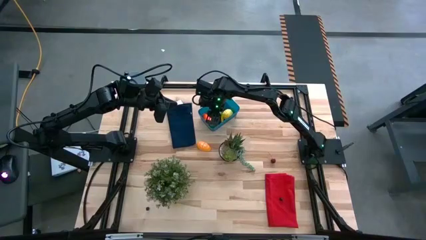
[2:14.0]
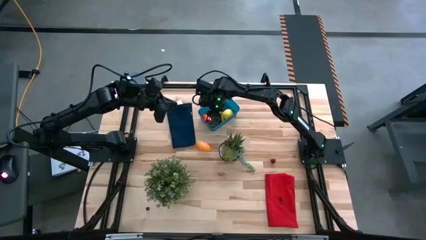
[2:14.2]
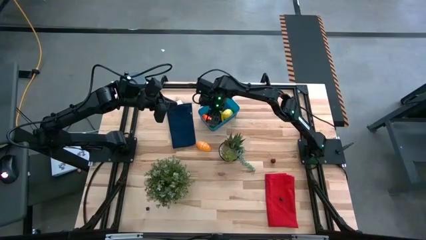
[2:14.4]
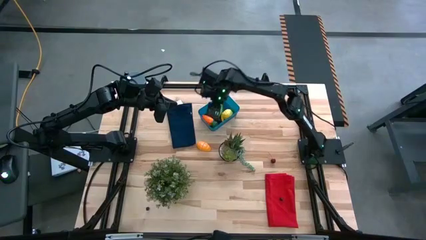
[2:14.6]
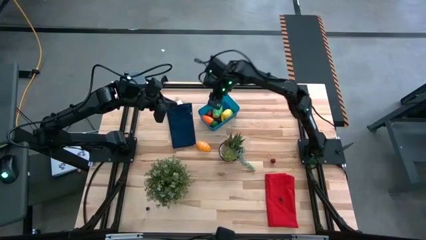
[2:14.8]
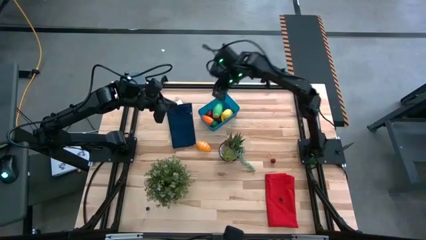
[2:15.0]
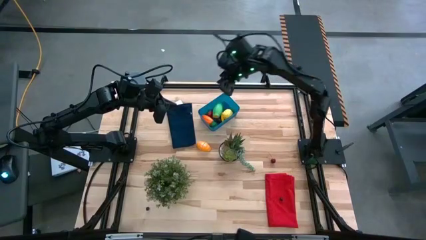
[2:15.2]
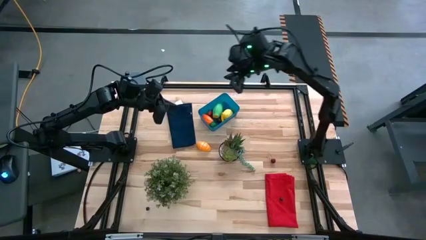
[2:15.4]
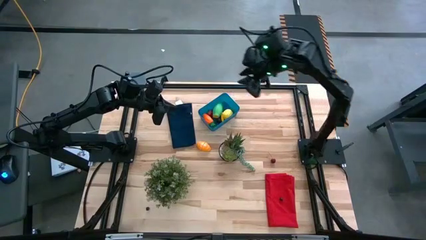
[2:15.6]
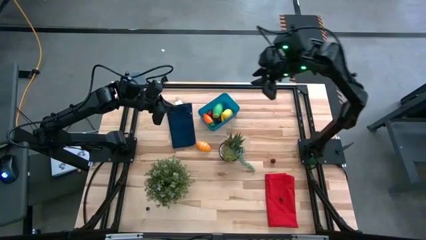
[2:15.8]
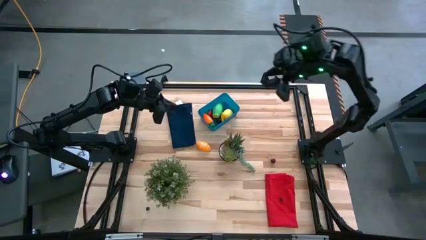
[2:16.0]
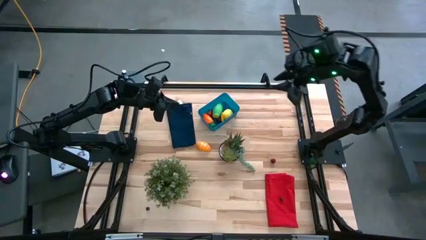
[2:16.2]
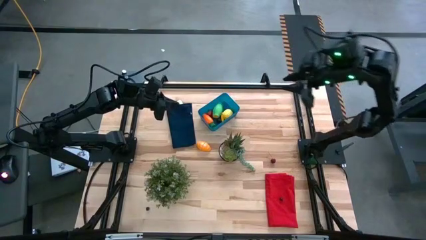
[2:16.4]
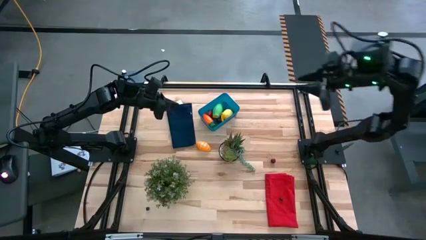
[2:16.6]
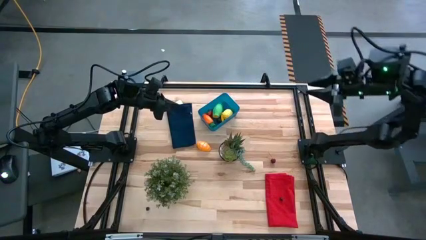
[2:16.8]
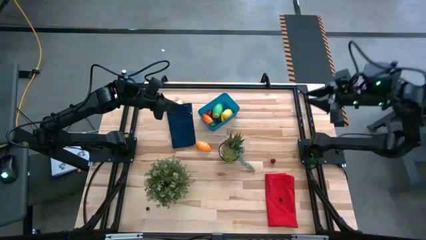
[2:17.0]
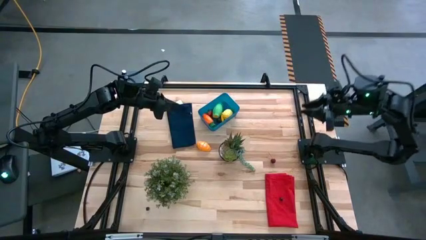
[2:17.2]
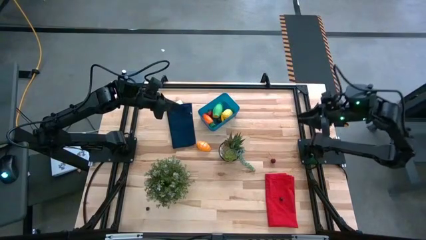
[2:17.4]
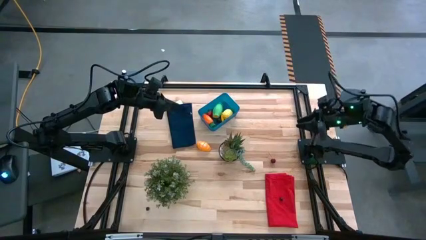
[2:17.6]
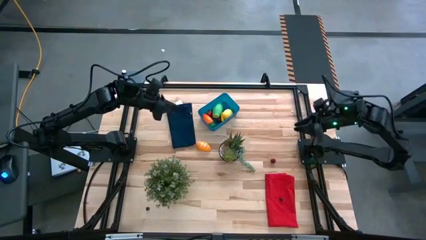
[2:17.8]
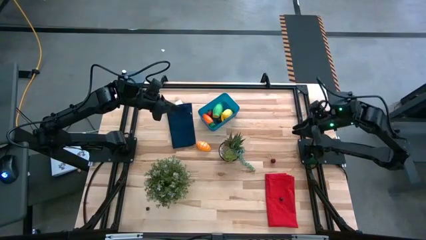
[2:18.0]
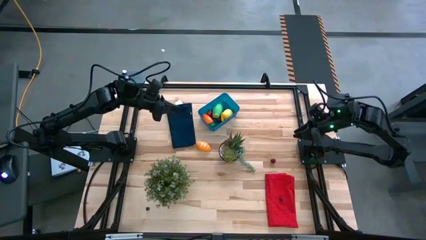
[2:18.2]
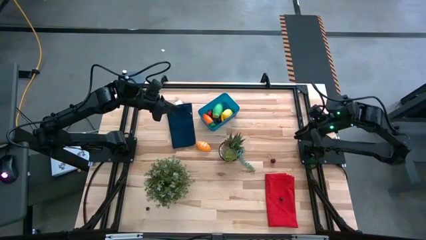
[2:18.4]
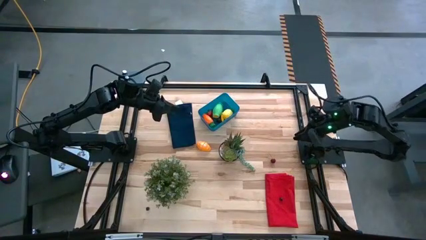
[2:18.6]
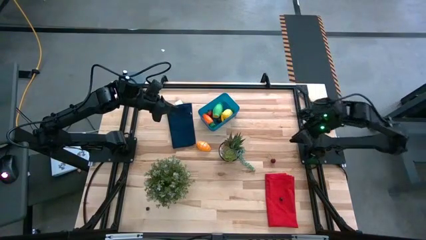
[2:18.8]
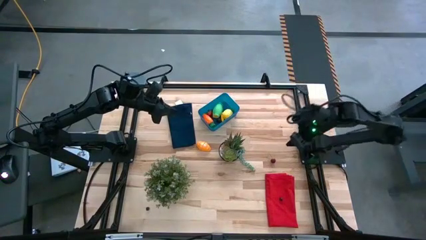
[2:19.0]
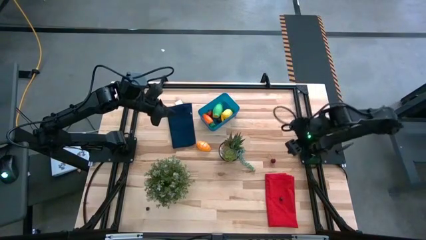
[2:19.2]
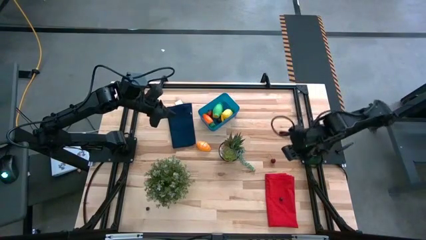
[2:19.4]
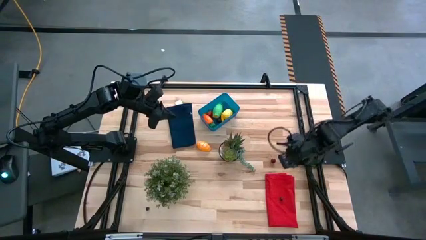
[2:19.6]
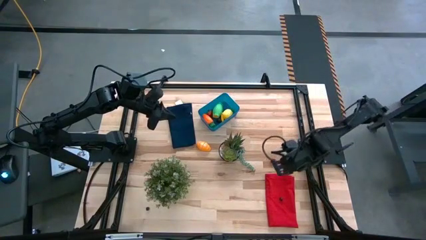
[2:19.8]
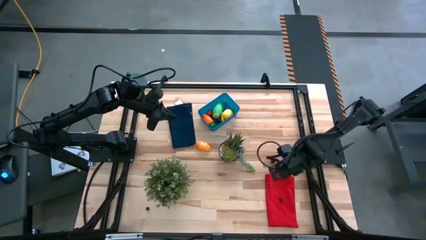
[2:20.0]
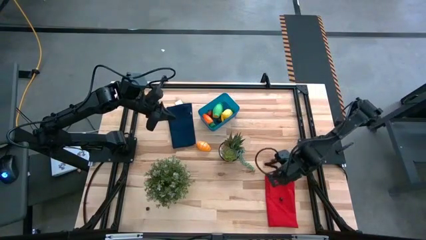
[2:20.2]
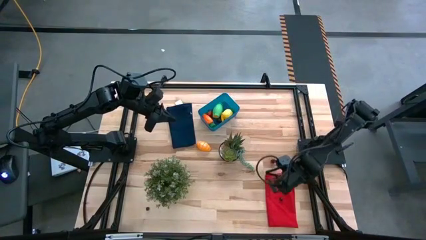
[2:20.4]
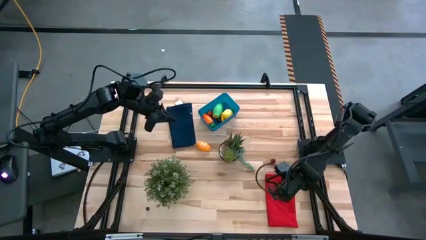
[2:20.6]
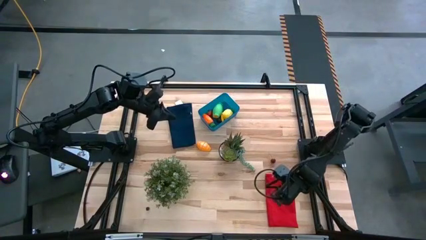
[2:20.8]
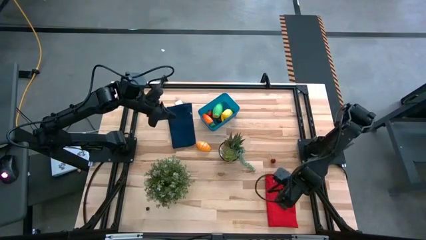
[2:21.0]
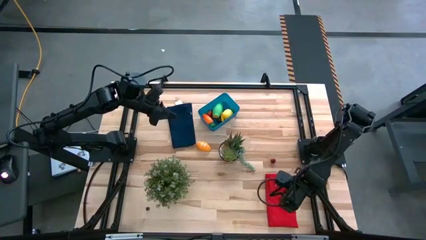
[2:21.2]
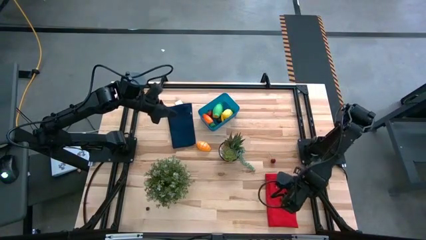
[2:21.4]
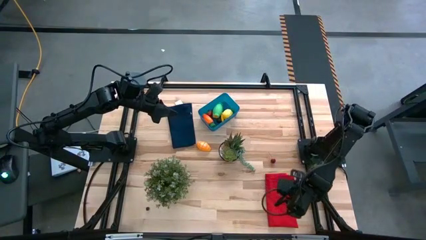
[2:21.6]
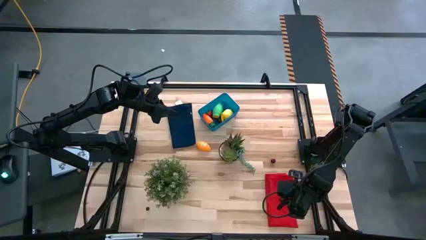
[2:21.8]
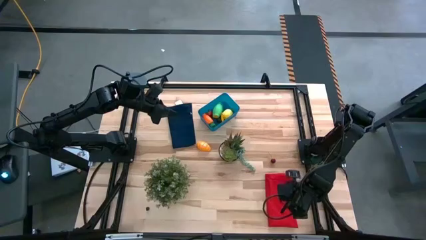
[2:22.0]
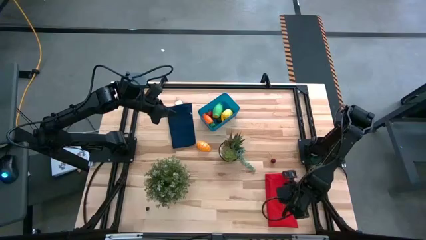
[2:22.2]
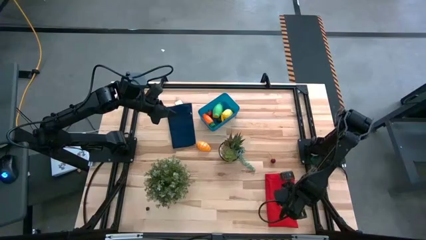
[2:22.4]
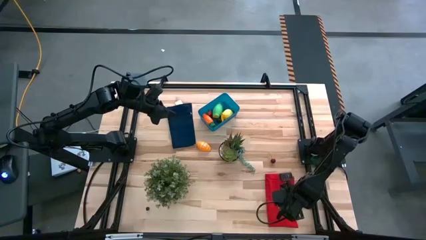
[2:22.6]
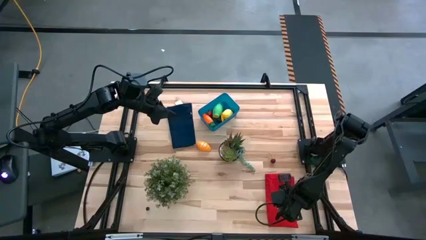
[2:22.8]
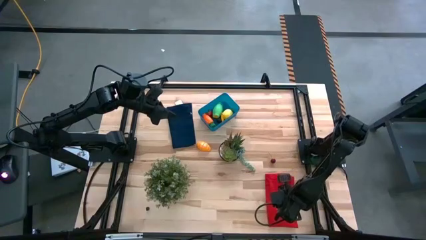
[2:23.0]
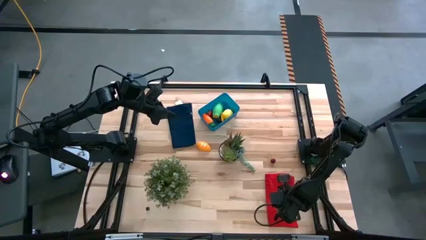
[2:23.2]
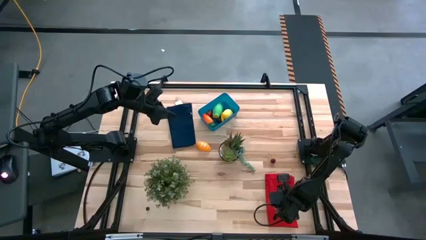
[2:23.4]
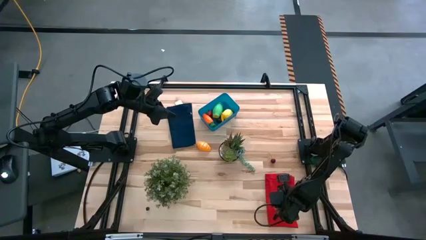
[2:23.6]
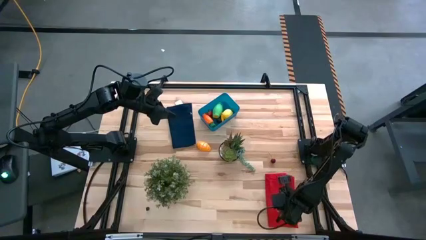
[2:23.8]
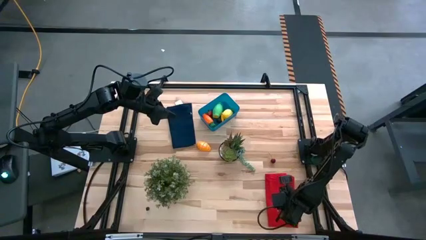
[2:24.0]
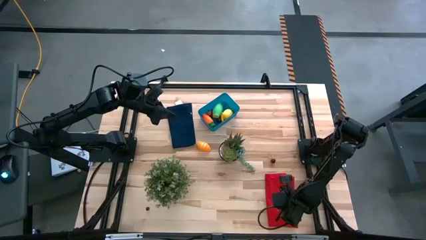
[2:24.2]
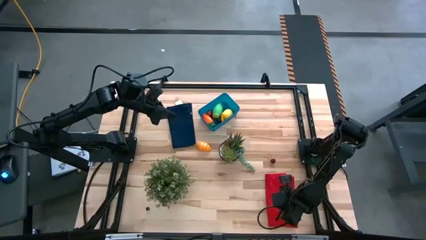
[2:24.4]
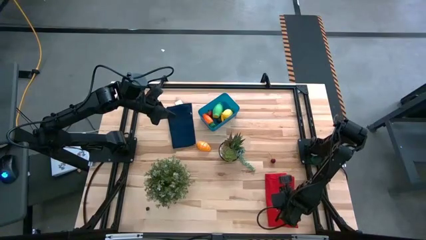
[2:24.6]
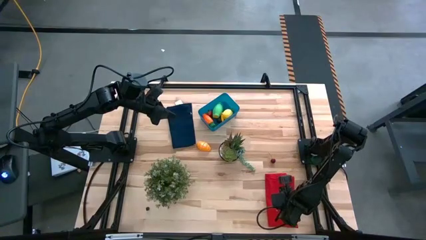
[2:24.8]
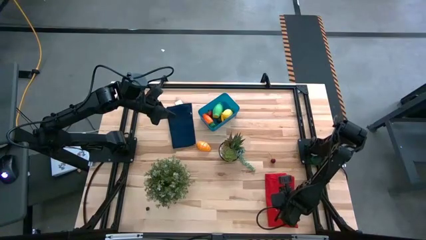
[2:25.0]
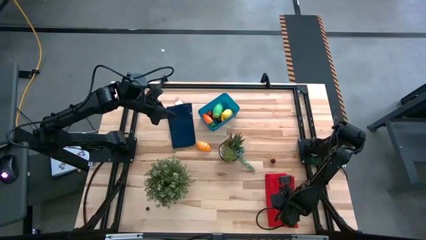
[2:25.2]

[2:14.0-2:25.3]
Task: Pick and placing Produce into tupperware
Put the right blue berry into the blue bin

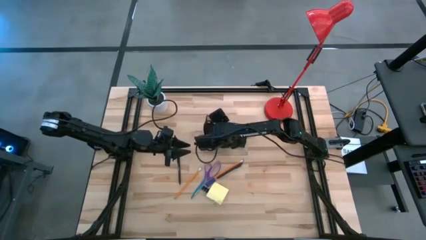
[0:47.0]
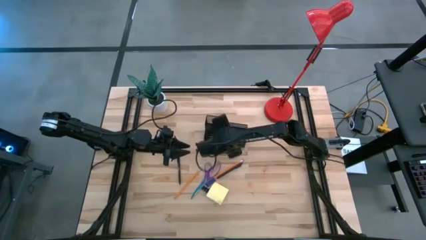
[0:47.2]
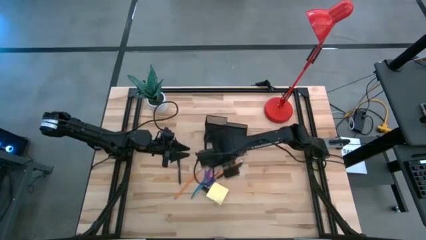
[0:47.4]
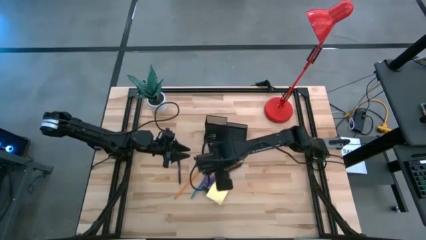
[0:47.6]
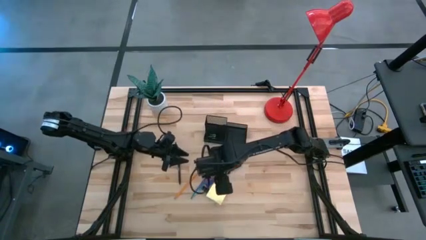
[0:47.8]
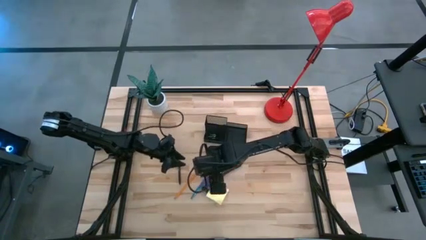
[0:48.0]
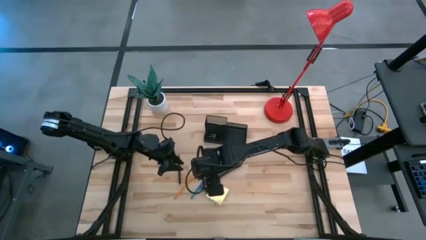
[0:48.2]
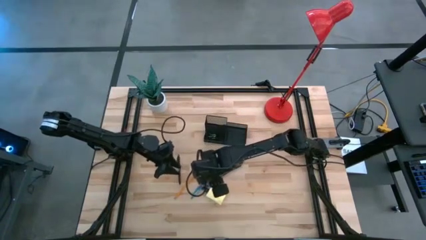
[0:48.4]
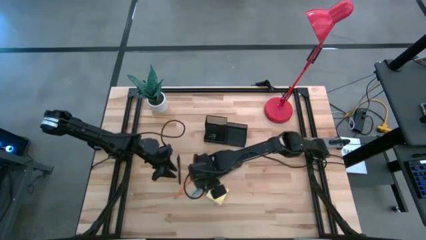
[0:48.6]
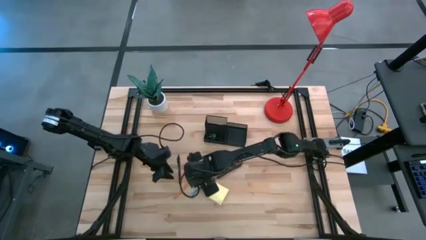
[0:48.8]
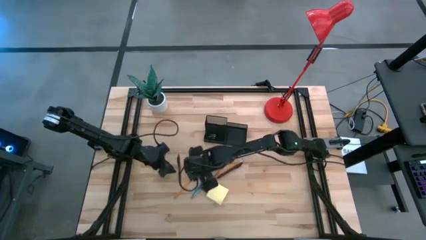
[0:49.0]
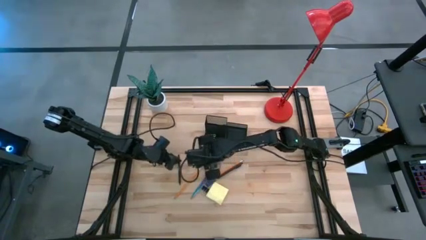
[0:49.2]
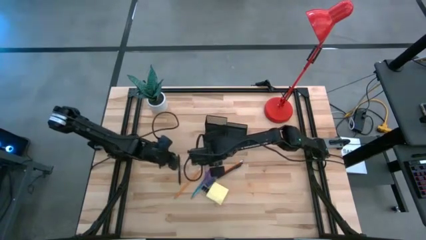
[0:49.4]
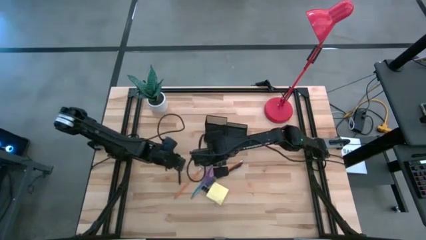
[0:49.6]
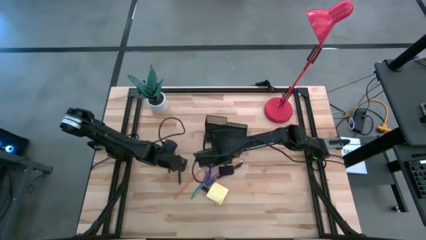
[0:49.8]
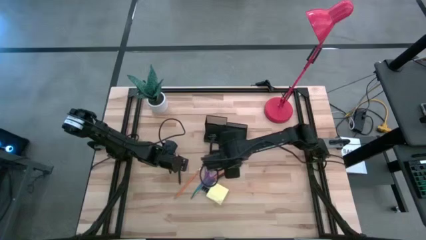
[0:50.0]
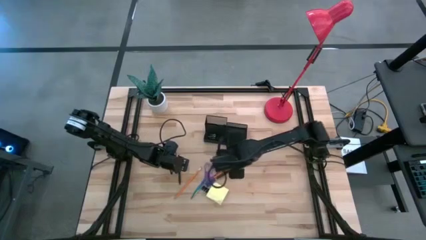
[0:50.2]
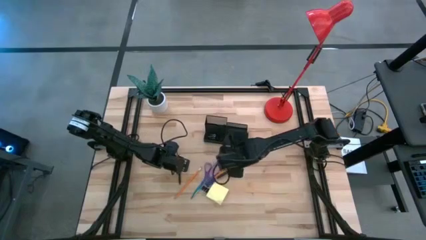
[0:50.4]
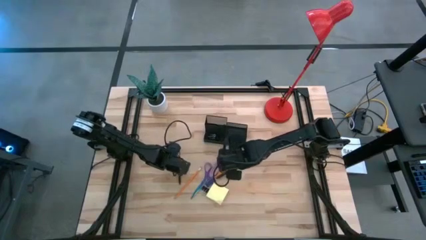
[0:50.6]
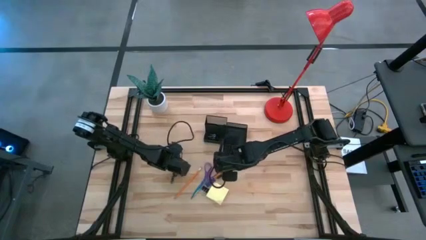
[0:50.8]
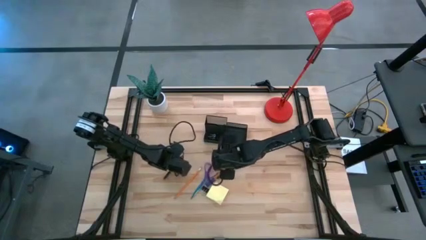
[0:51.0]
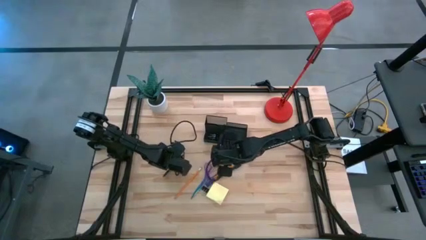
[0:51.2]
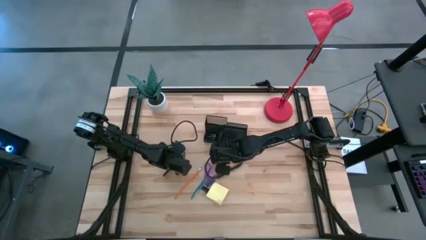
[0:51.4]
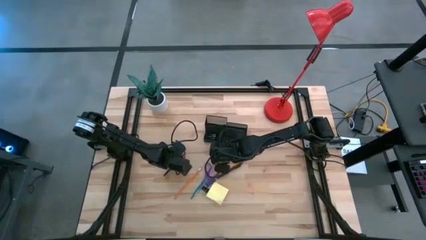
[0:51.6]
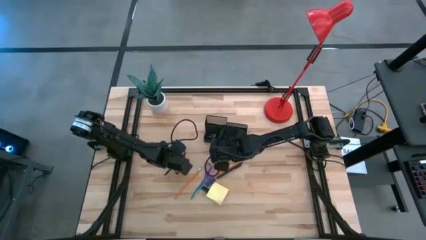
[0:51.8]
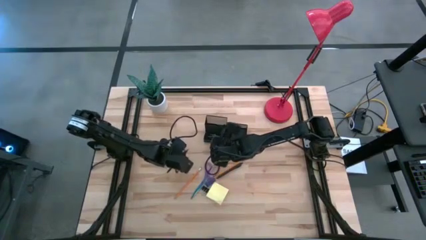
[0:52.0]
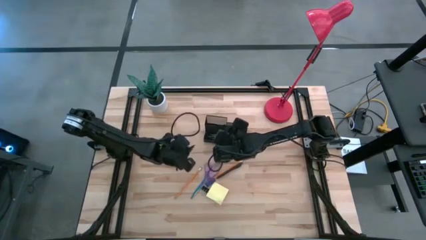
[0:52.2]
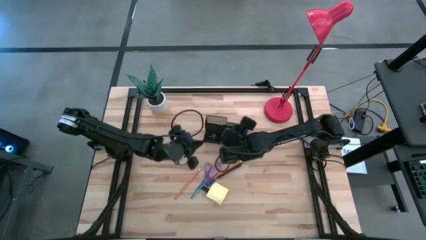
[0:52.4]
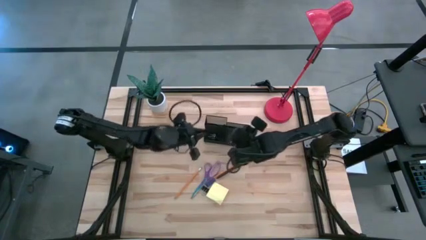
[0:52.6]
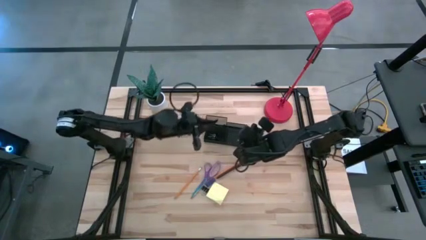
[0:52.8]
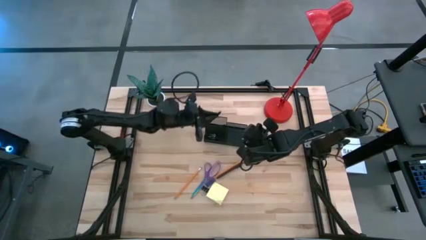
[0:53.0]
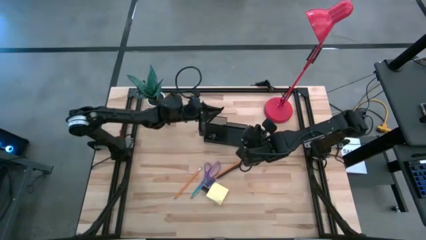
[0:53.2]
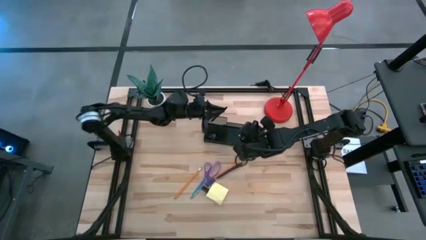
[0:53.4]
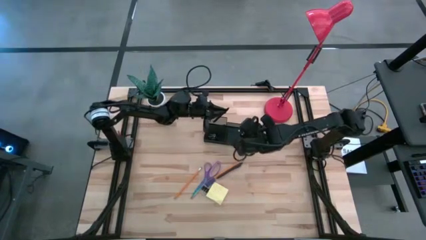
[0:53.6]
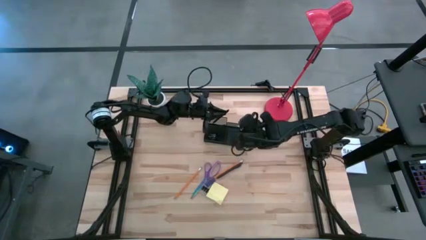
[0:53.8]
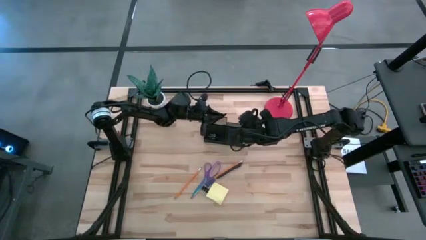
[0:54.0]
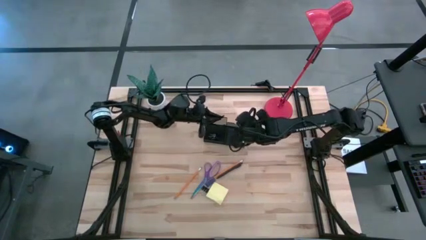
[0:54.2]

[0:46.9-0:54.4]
Task: Pick and place office supplies into organizer
Put the left black pen into the black desk organizer
